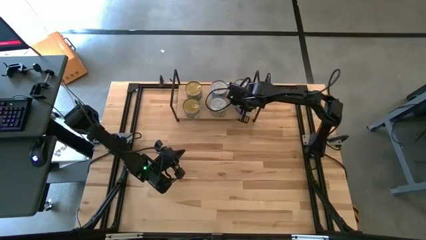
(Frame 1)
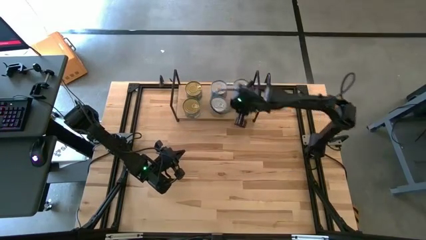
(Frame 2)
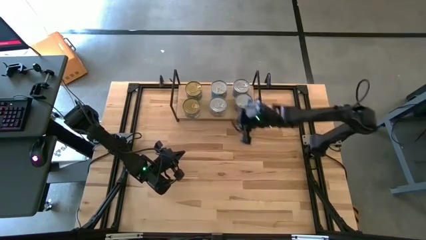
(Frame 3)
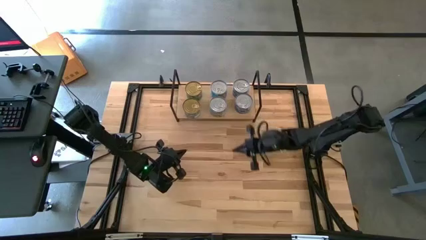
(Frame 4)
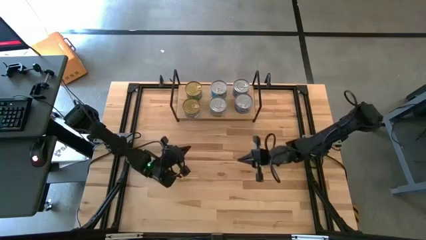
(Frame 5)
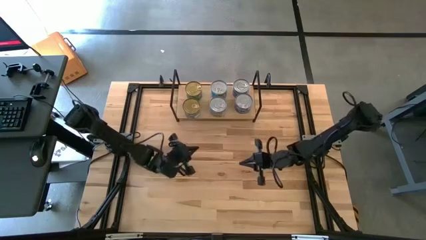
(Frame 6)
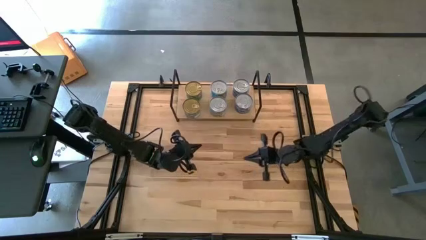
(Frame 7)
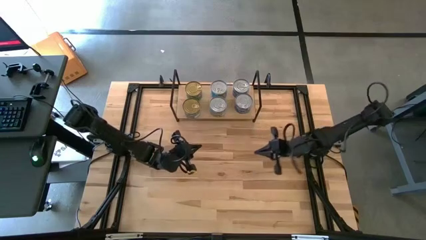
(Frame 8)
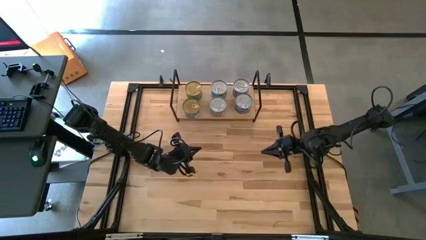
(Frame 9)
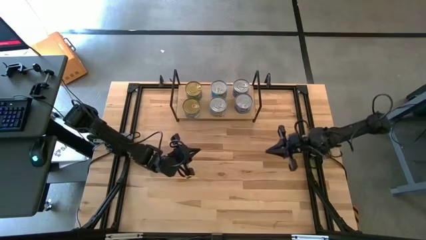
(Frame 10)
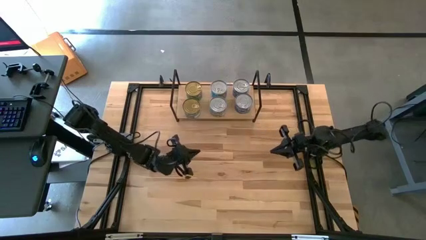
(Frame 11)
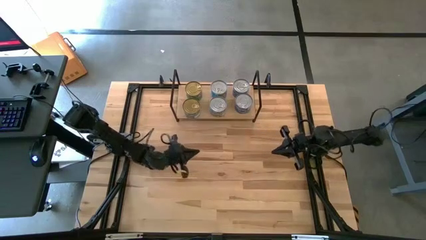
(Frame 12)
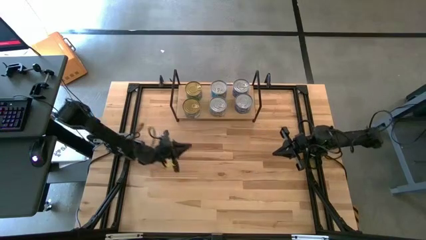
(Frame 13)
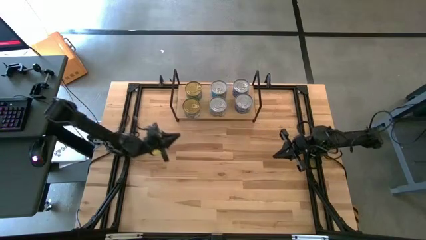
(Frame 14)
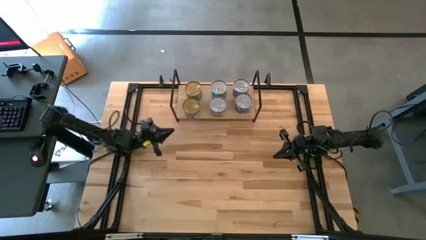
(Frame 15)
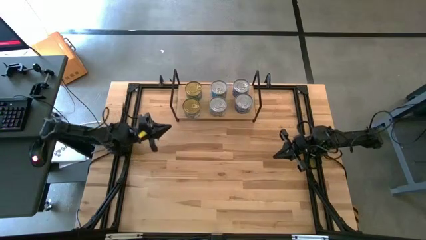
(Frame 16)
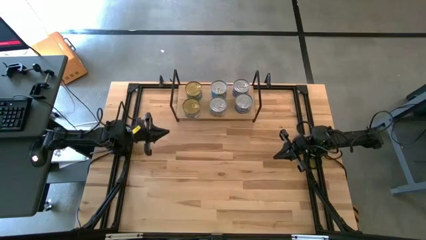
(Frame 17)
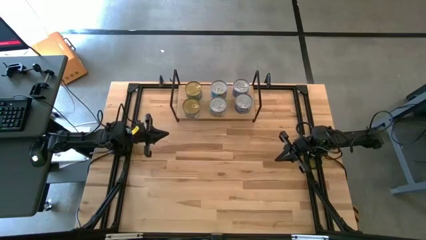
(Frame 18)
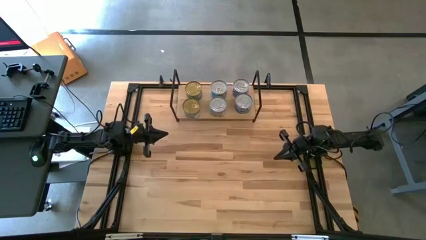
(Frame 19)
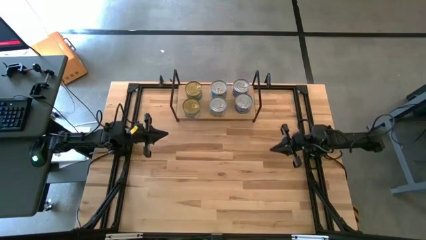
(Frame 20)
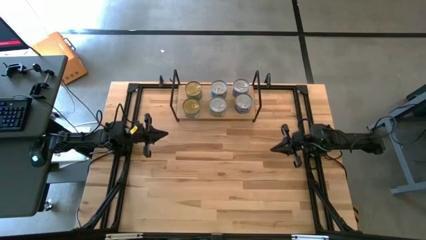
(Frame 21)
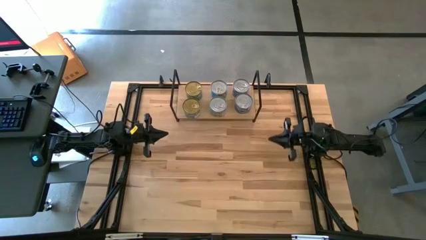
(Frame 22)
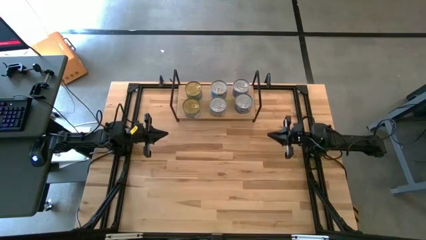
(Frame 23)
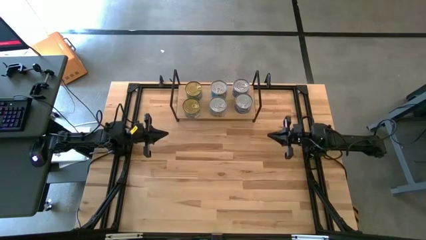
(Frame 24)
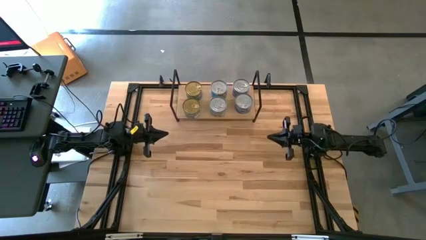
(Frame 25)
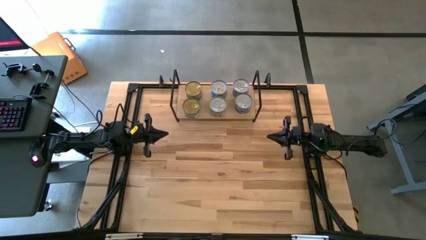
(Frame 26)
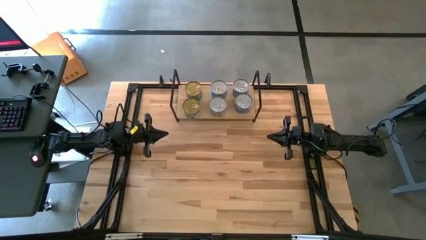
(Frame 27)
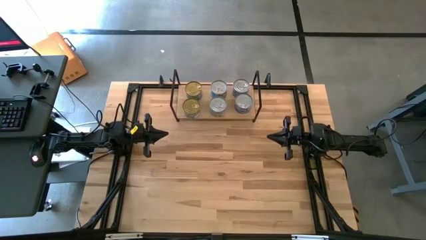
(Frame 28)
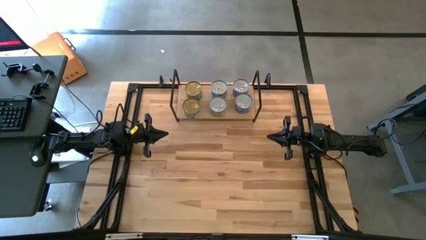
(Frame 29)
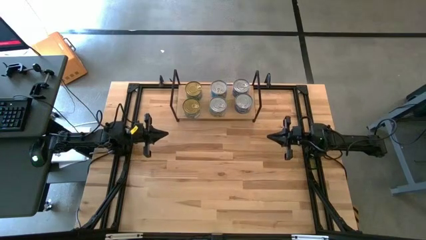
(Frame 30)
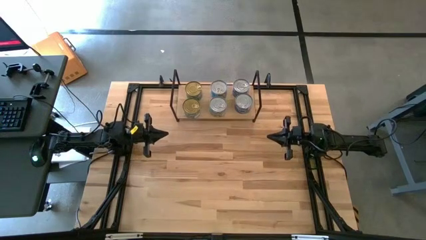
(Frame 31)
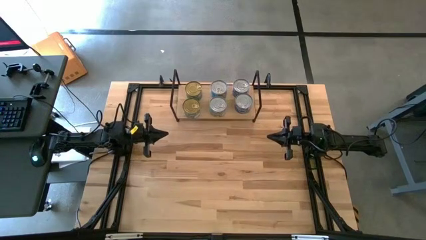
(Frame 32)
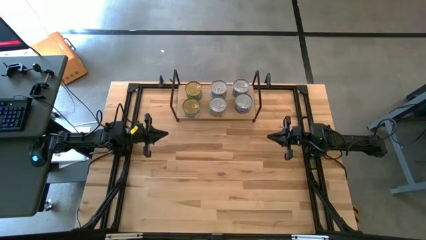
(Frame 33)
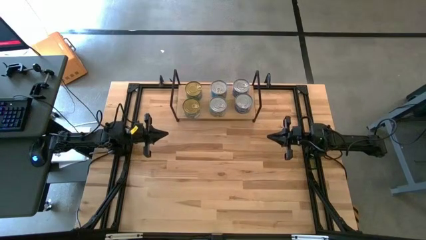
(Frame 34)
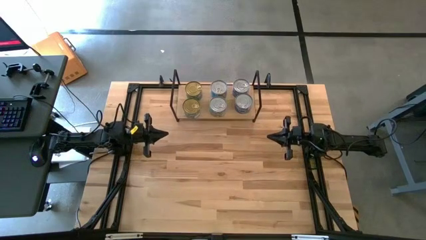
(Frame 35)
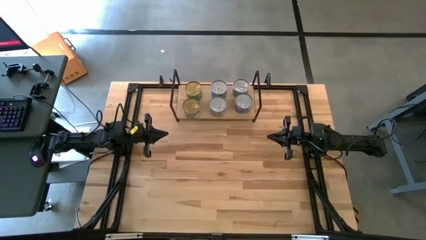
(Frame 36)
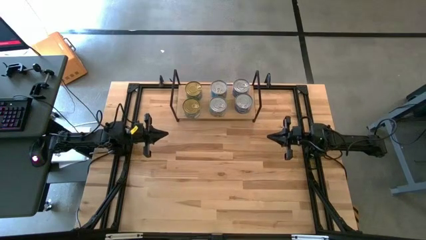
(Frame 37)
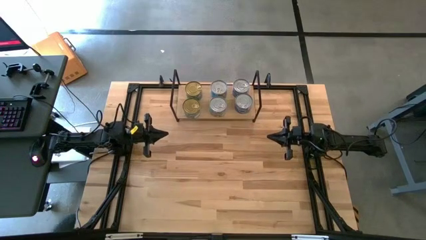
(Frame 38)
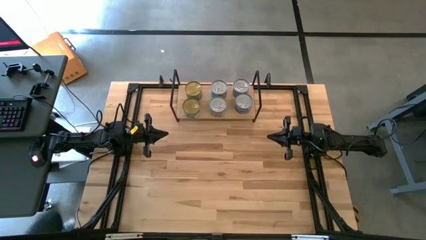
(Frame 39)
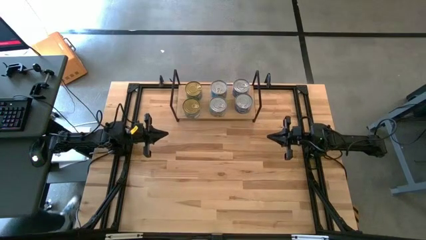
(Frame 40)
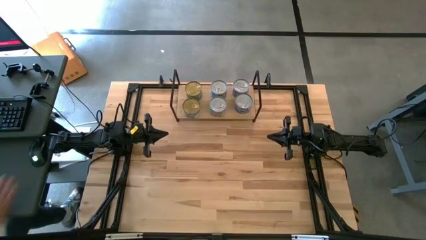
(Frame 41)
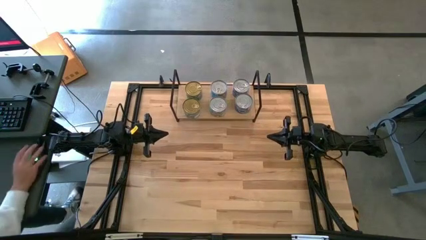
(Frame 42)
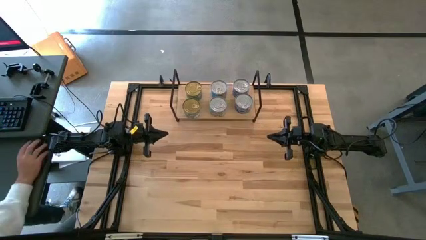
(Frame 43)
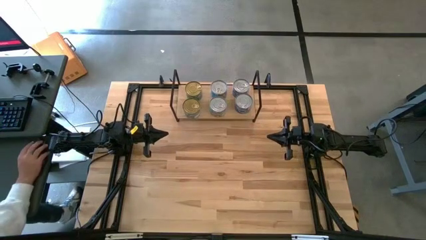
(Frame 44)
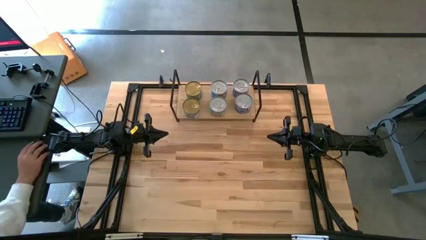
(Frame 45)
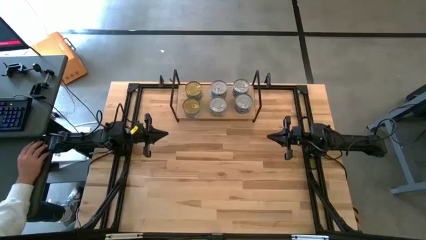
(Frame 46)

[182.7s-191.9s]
Task: Stack canned seafood by type on shelf
Return to Home Position

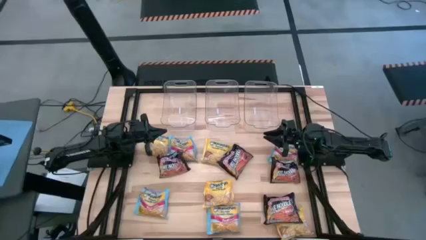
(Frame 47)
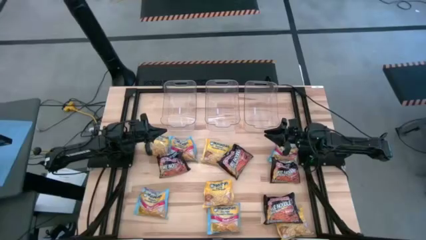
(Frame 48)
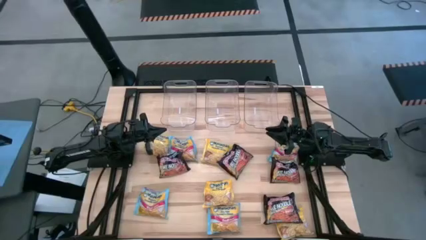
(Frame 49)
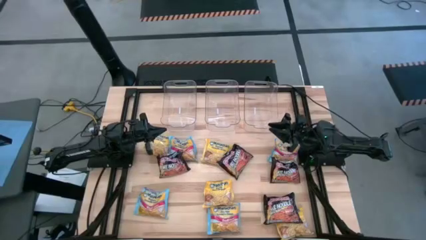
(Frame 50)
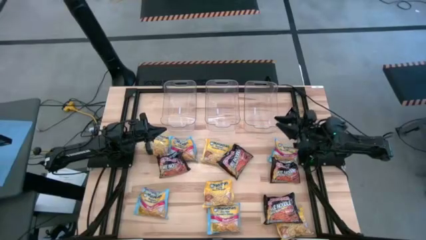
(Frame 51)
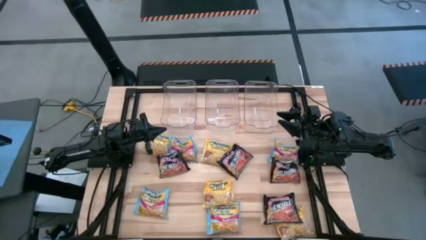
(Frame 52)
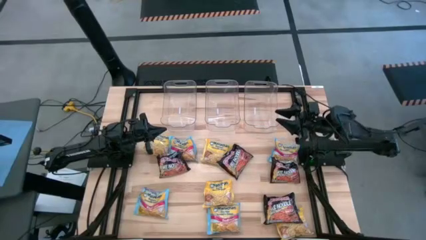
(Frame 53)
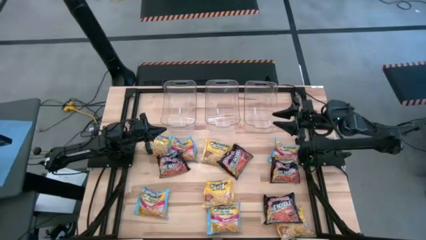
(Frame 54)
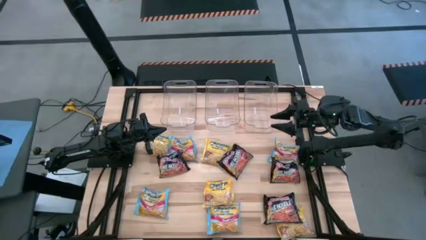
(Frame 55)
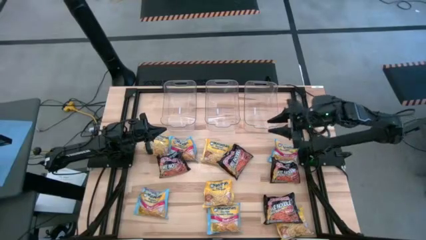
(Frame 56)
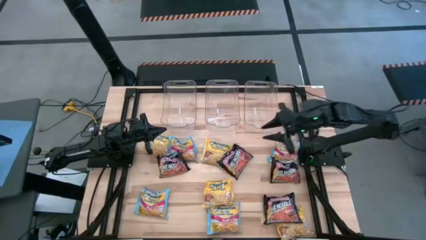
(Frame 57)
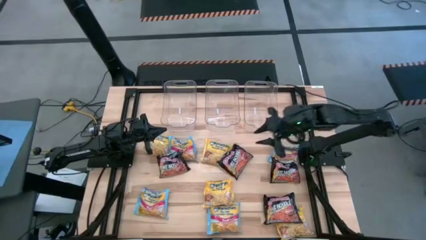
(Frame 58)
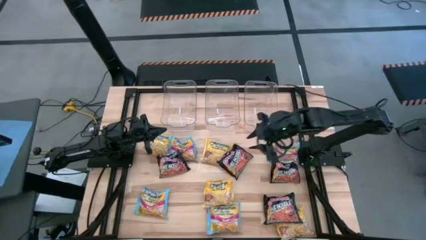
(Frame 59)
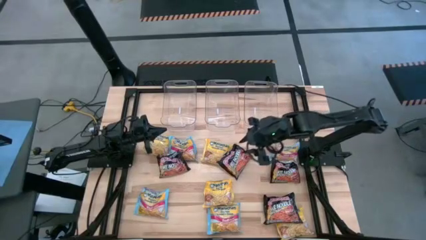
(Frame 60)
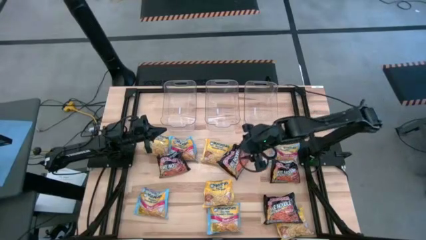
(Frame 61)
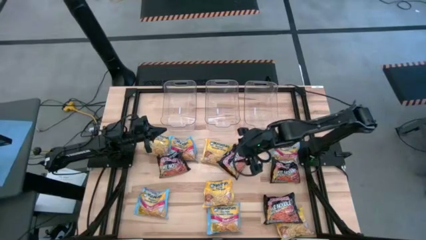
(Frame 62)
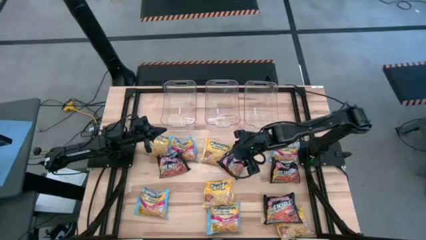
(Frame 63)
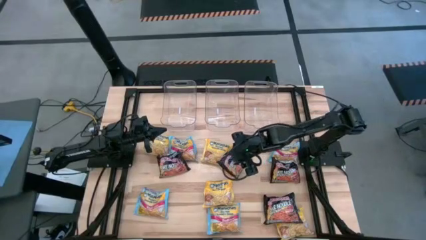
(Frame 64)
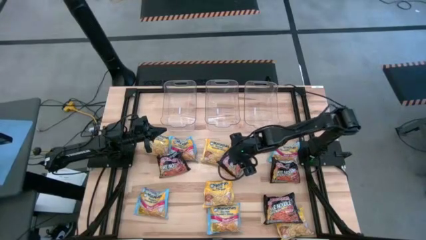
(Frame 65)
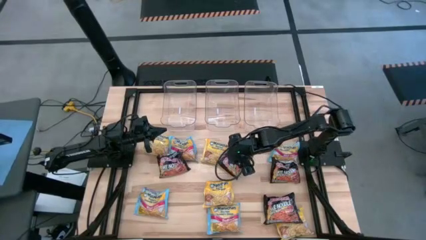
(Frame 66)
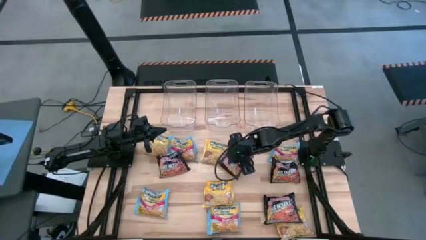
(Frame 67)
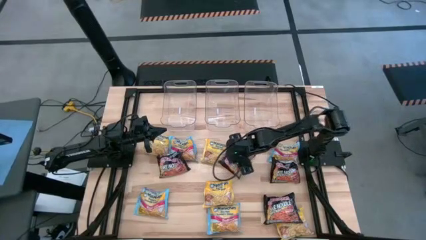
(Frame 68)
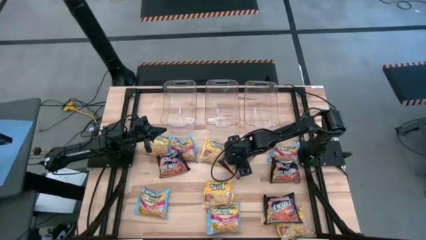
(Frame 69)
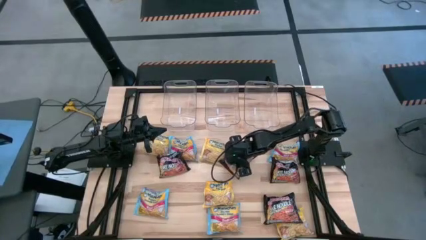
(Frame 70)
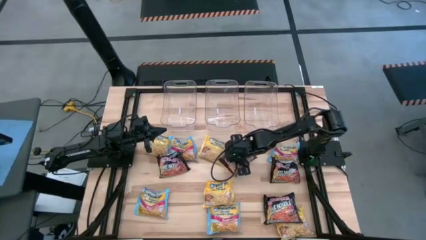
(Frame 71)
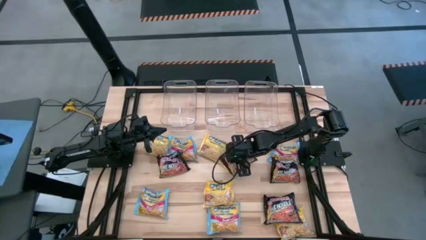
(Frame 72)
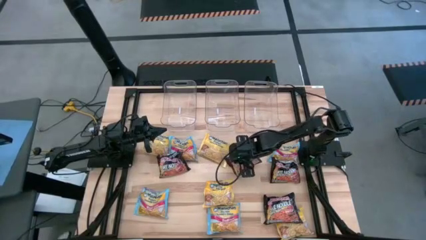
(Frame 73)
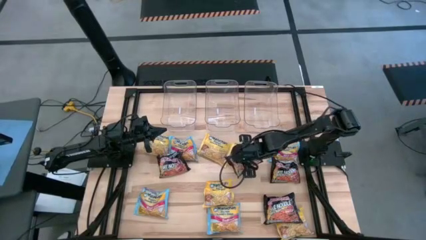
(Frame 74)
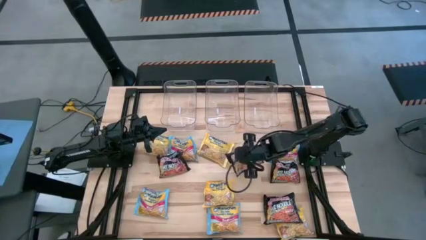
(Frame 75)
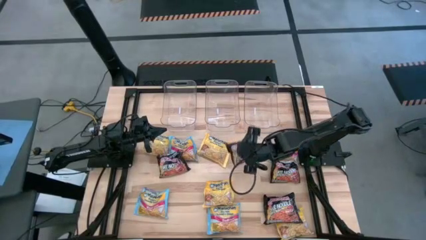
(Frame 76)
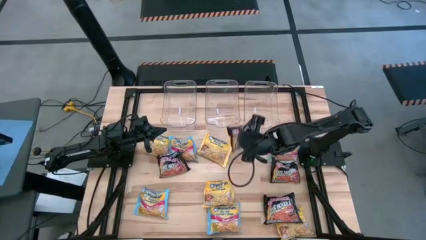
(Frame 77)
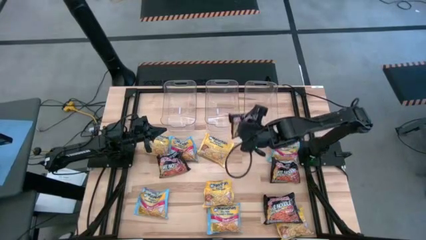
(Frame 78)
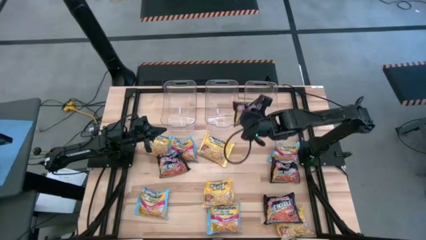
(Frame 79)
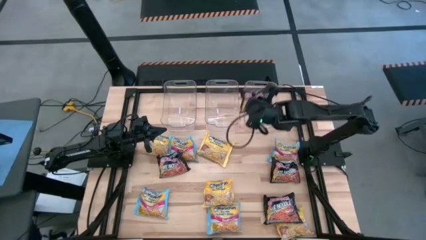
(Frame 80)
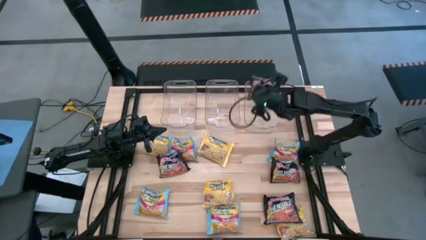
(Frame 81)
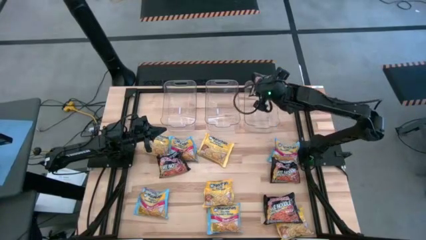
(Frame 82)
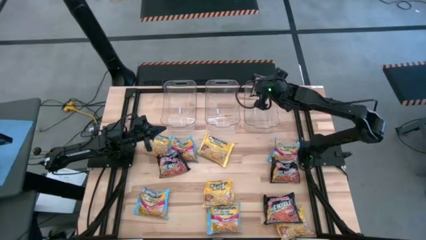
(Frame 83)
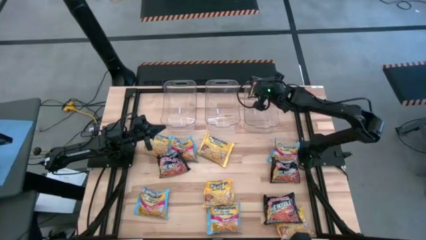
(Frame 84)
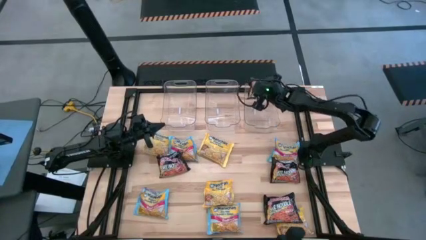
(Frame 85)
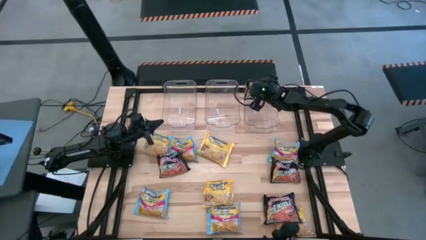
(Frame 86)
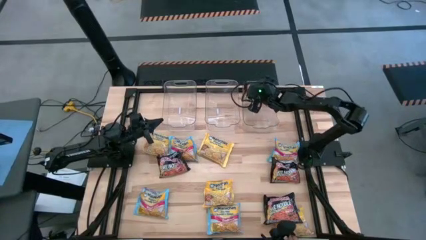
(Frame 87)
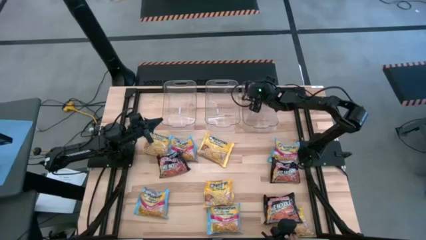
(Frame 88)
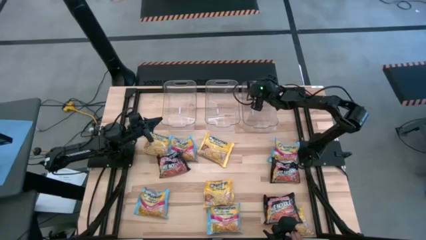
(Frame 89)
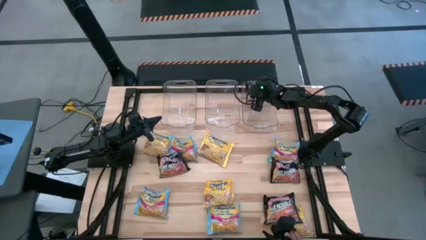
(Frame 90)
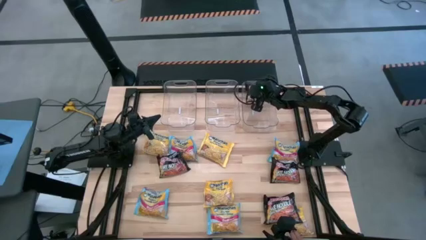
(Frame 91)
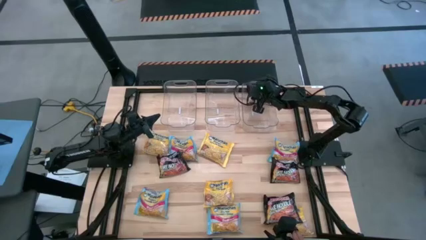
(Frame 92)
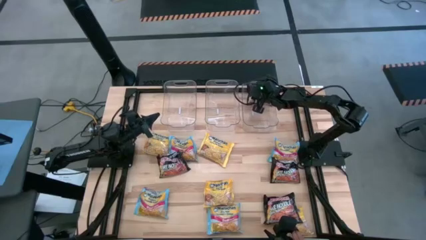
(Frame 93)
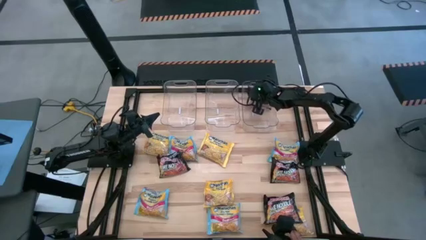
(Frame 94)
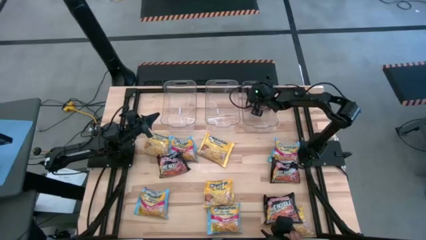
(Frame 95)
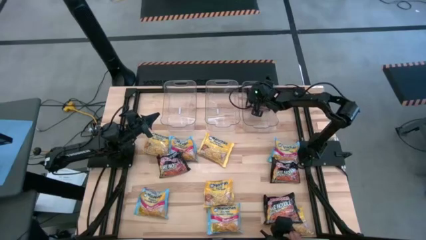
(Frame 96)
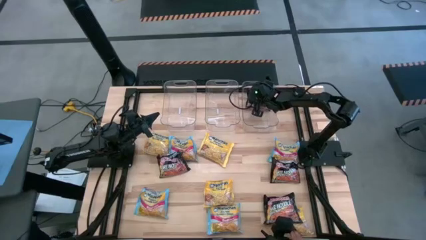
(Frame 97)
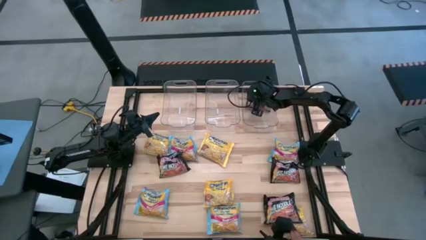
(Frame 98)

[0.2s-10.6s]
Task: Sort Maruchan noodles
Put the black noodle pack into the right transparent bin
